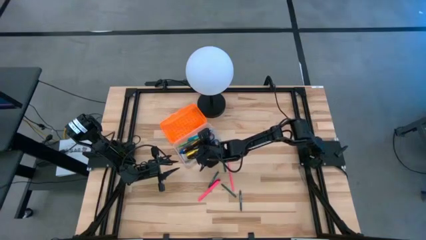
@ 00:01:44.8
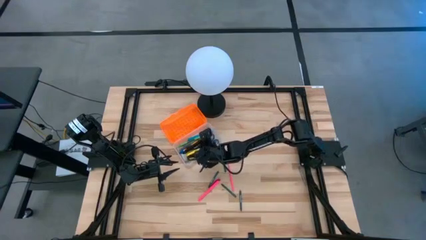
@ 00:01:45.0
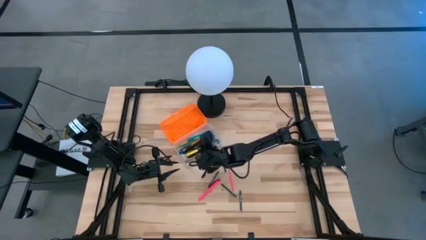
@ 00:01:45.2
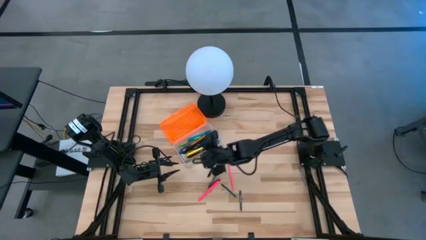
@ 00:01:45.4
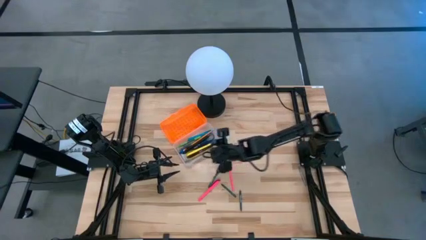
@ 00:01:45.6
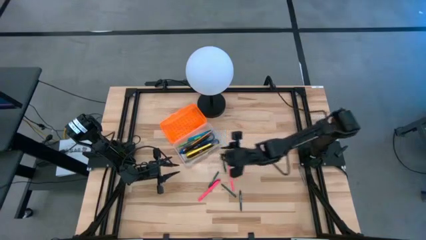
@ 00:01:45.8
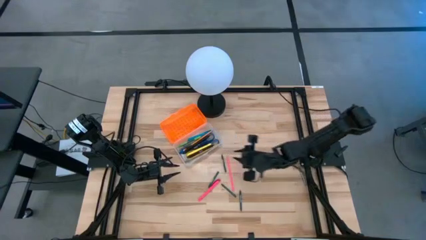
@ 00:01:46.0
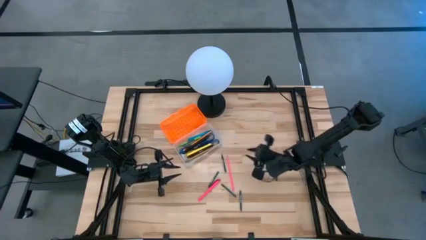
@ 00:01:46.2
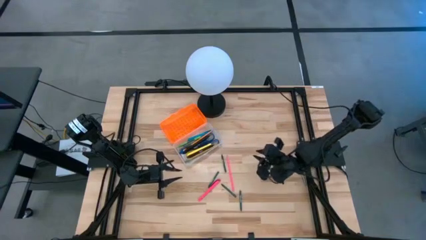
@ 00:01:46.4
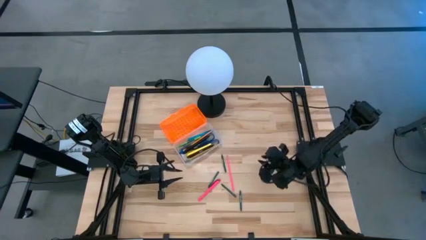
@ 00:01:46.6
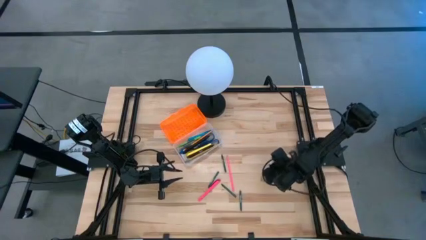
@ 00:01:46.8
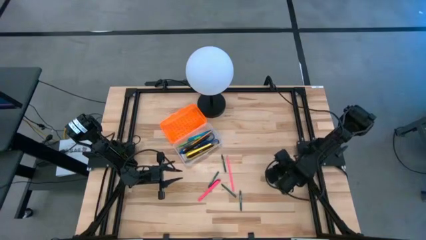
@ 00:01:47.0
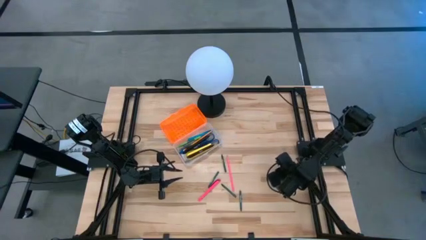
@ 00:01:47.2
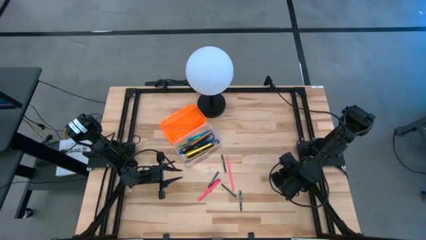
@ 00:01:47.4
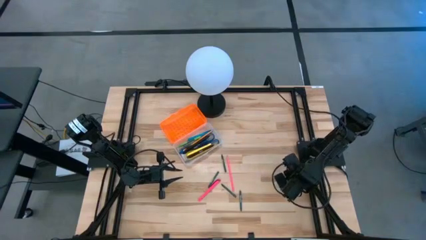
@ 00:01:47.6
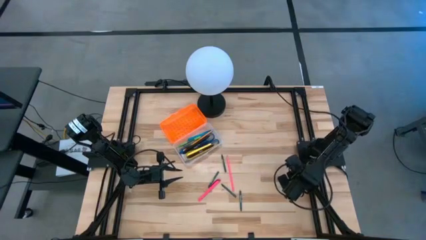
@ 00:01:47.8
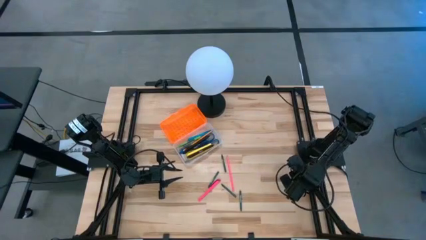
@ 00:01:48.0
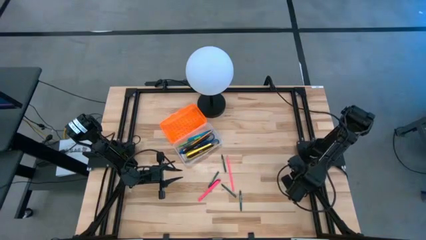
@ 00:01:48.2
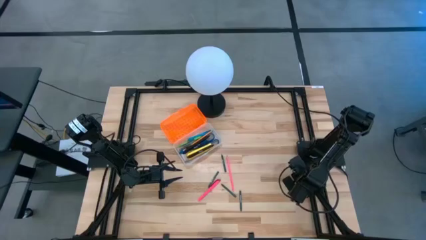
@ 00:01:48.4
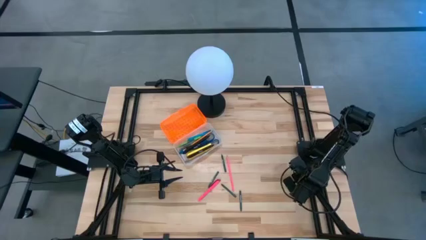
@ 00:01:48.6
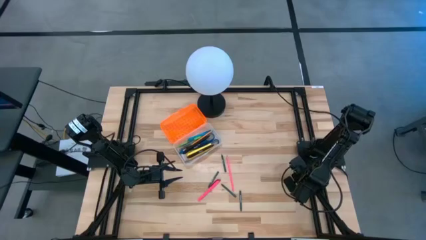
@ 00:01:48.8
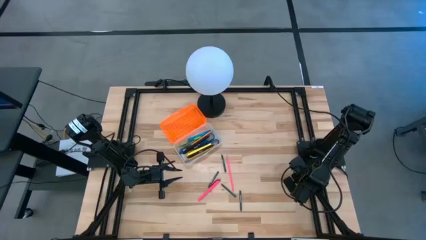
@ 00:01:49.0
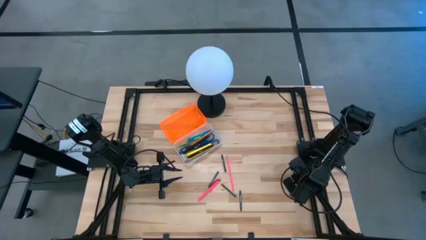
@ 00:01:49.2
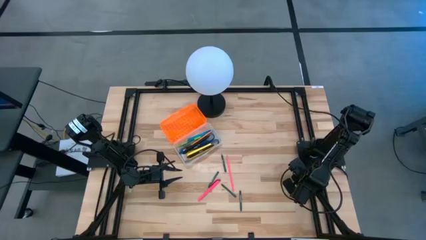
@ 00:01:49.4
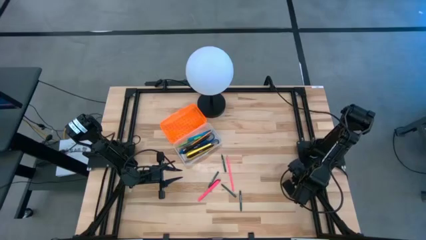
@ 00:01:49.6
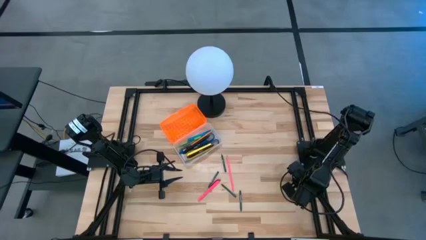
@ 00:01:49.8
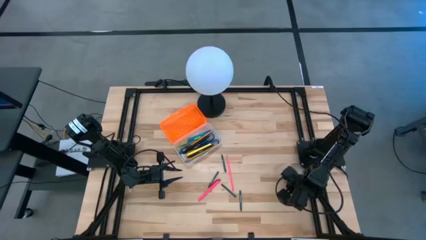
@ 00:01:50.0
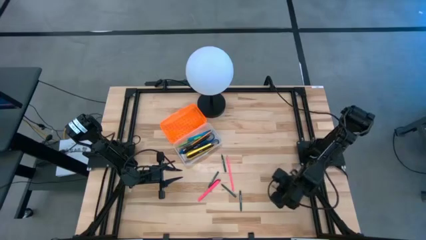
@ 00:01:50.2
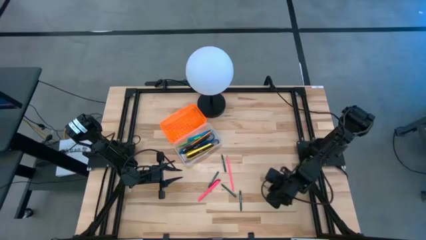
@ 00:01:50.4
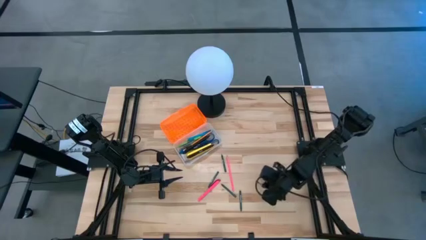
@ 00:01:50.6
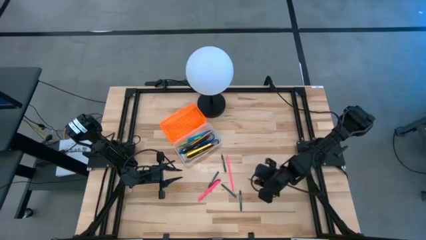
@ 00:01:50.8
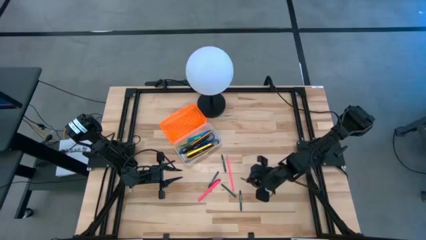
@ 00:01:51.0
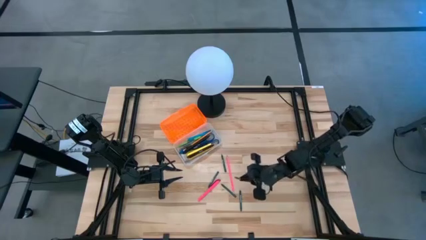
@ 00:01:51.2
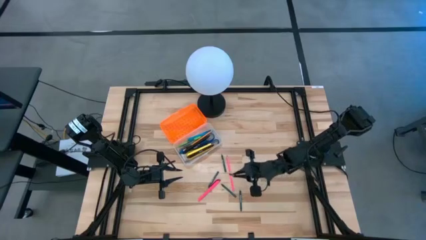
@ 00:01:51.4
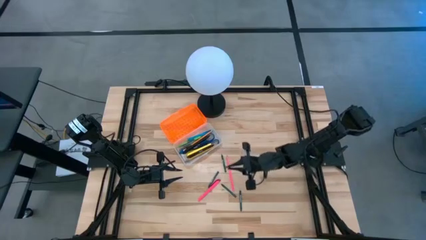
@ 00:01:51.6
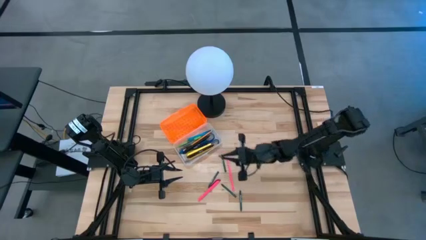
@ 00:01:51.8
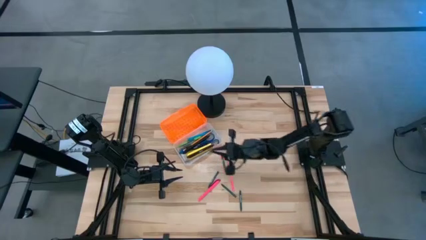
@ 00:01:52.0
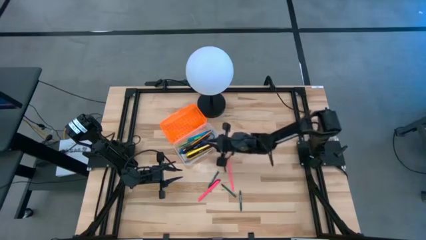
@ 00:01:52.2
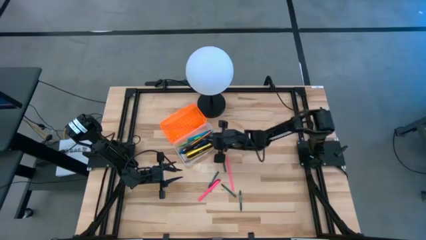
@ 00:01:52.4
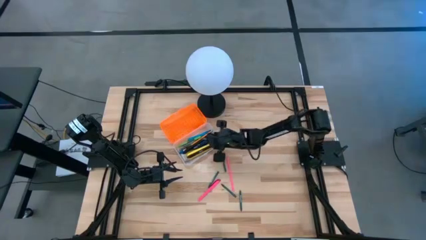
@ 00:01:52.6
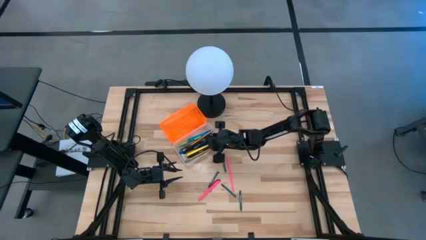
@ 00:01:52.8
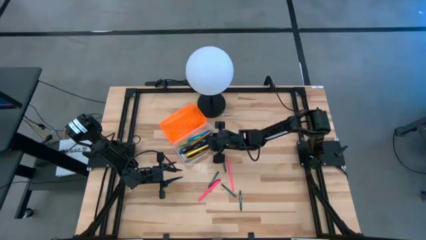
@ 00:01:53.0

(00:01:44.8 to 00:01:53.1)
Task: Pick & place school supplies into a supply box
Put the gray crayon into the orange supply box

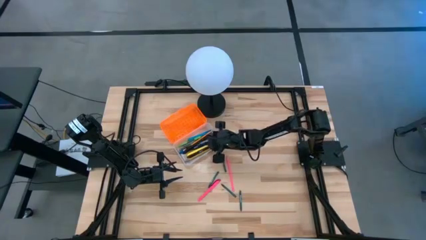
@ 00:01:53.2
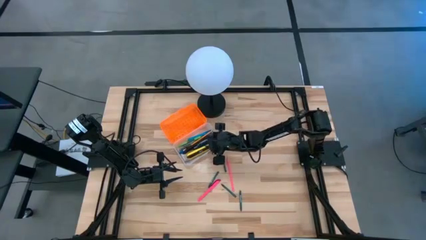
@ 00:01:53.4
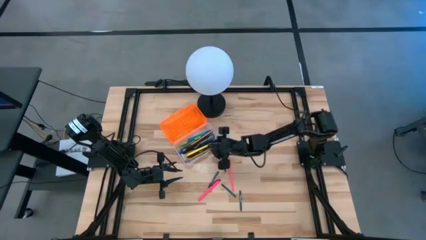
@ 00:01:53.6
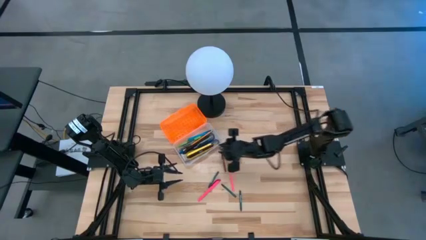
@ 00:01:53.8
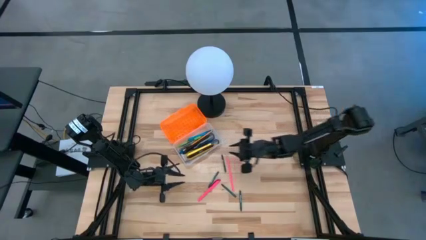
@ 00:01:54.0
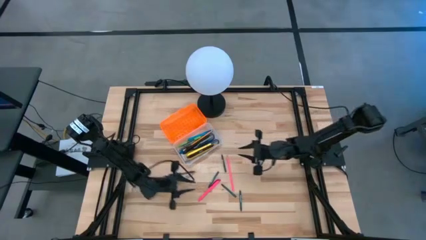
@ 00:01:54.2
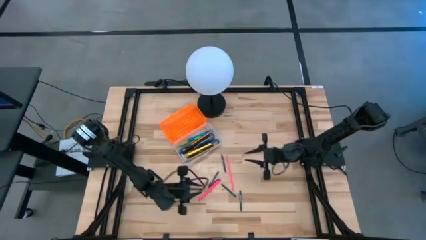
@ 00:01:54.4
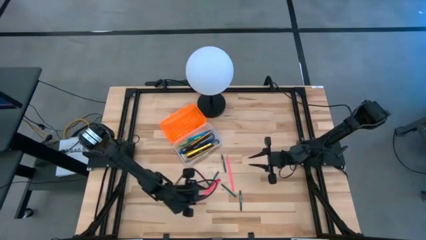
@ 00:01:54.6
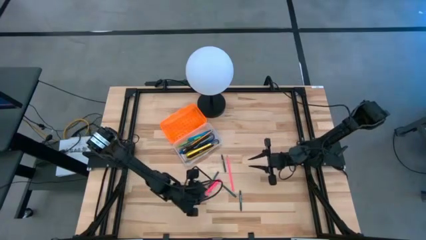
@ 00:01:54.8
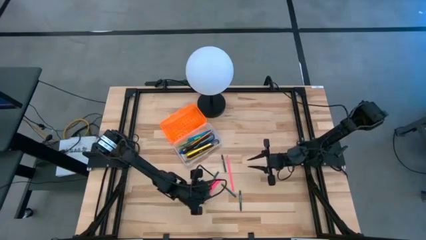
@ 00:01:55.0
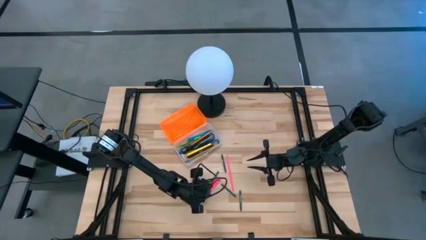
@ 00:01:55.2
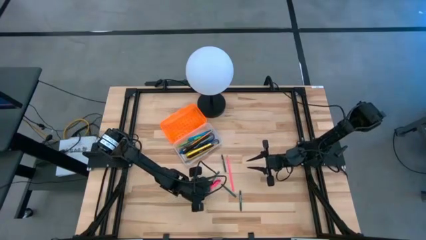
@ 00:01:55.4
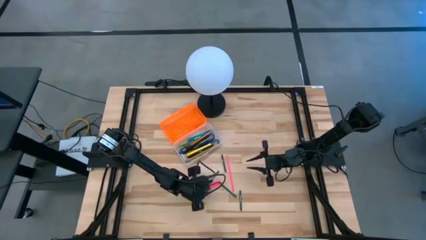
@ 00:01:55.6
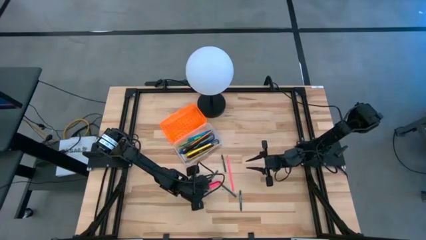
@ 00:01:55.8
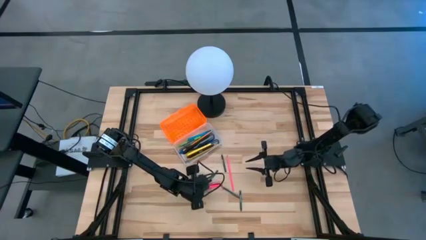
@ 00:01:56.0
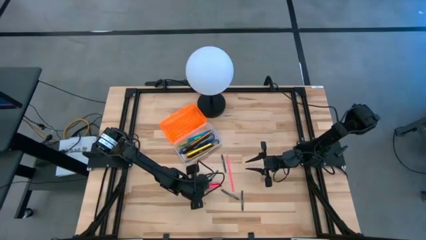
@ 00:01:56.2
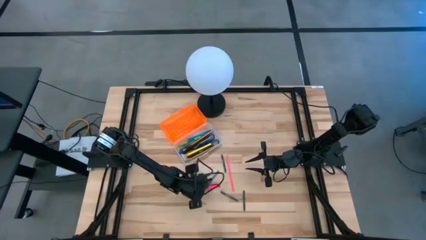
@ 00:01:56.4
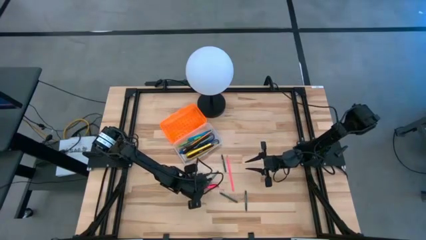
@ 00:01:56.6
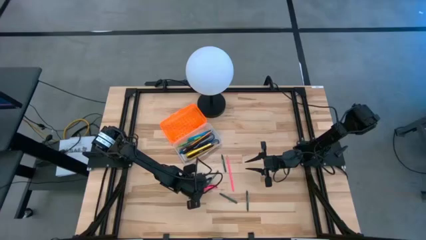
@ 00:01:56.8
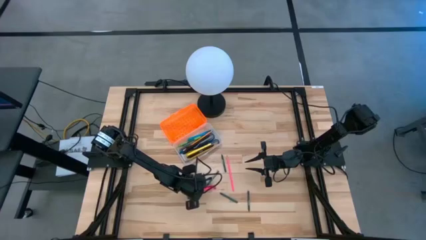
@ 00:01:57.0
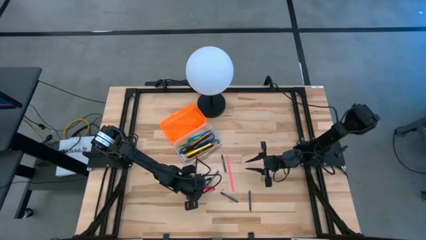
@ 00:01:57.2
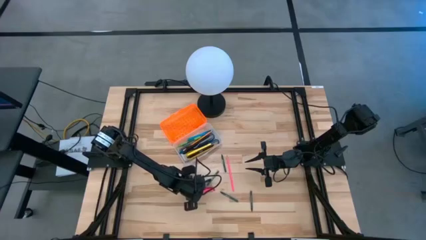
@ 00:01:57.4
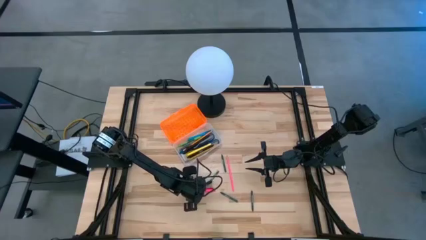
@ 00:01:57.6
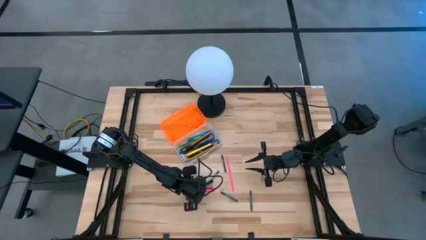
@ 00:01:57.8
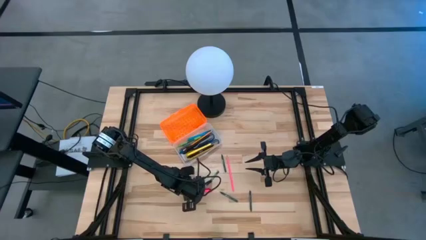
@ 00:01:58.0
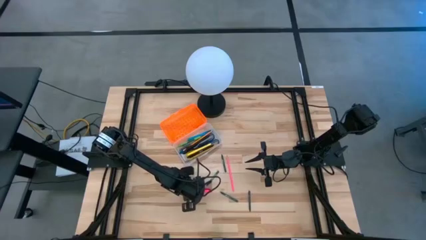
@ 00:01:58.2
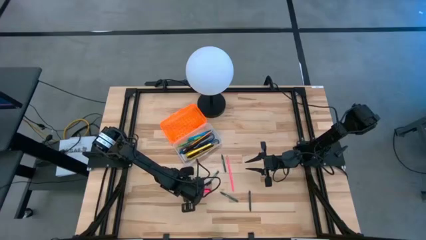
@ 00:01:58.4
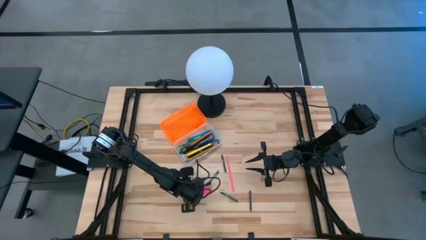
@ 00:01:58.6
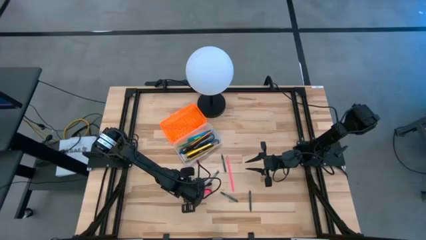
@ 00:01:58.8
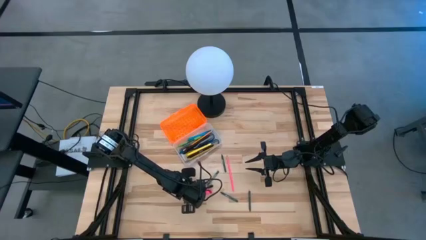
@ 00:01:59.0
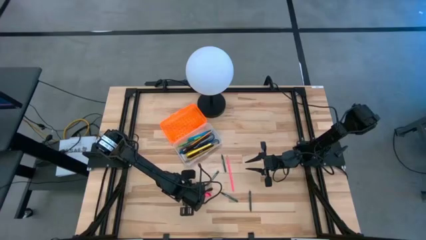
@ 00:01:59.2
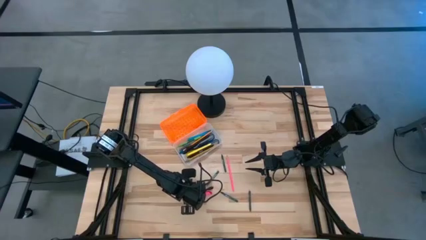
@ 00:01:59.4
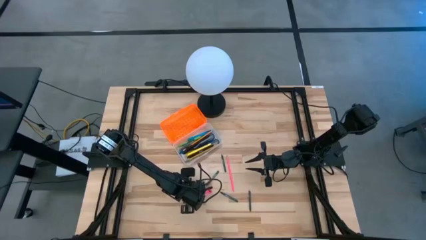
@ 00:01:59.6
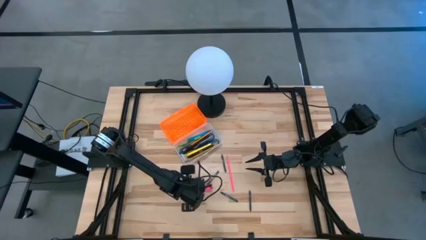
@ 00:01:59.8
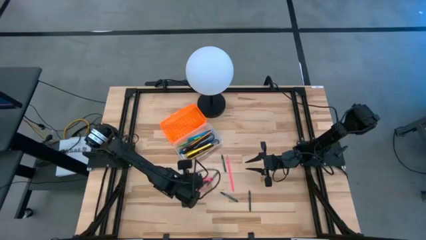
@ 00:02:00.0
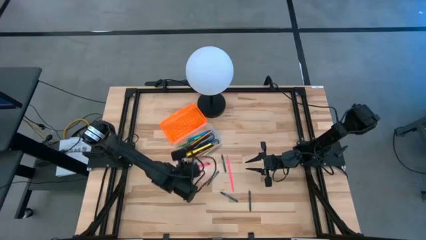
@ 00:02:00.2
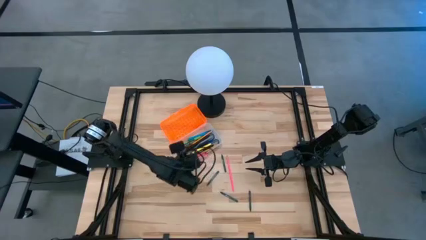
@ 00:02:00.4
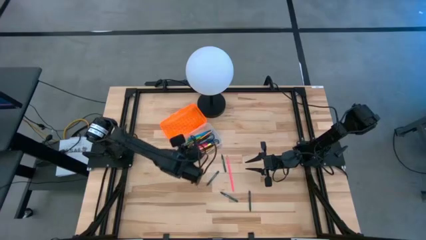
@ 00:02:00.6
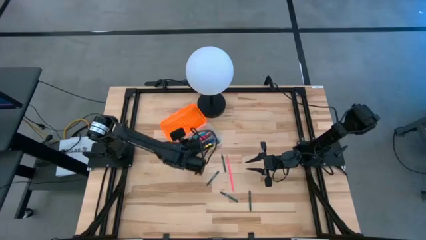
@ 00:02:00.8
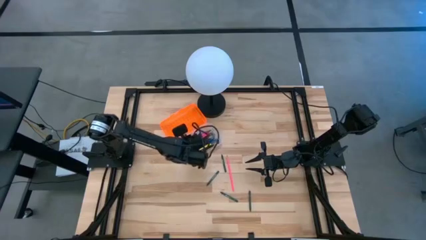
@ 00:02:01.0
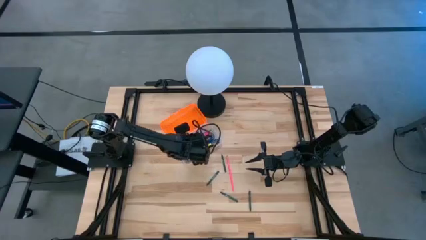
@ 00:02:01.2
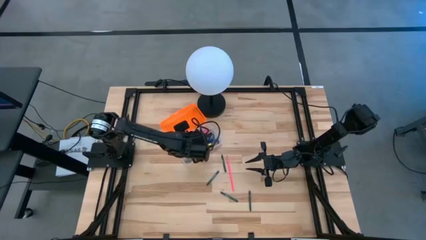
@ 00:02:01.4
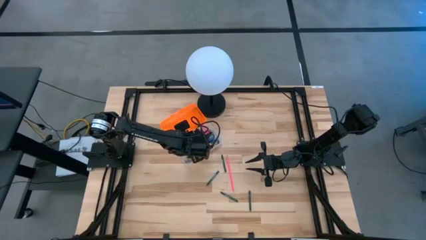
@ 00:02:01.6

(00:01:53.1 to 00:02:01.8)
Put the pink pen into the orange supply box
